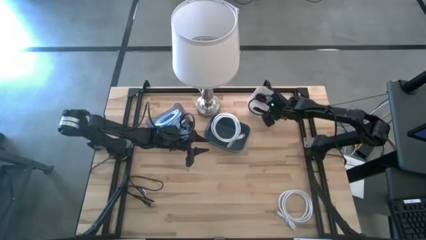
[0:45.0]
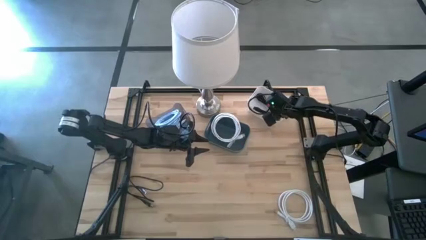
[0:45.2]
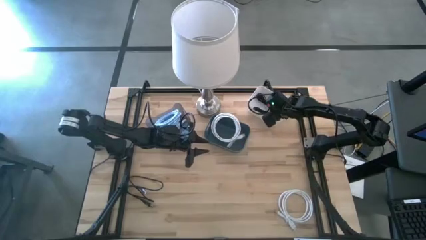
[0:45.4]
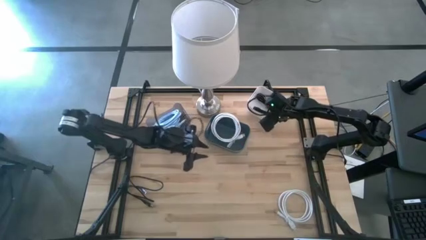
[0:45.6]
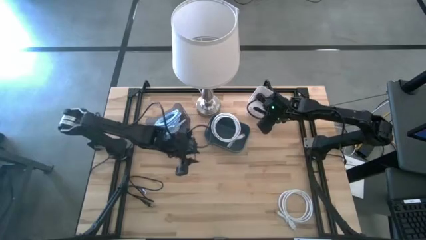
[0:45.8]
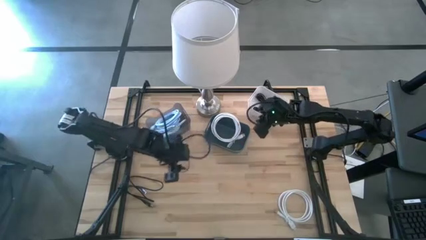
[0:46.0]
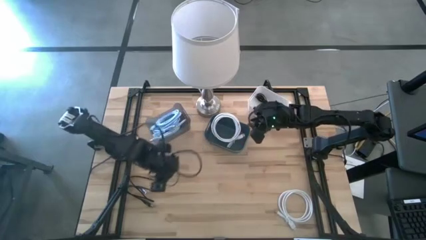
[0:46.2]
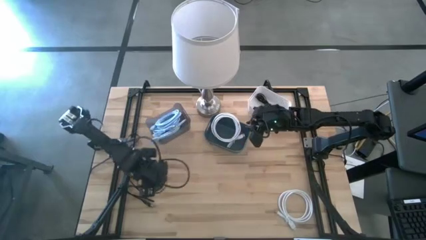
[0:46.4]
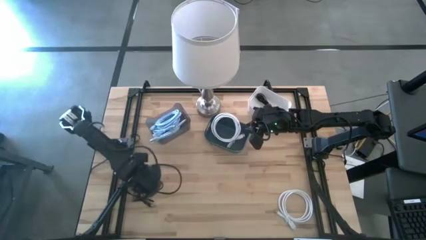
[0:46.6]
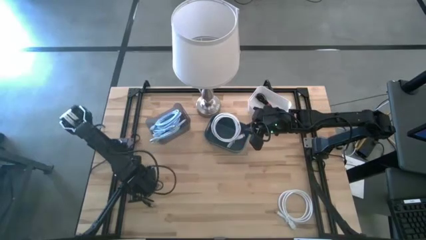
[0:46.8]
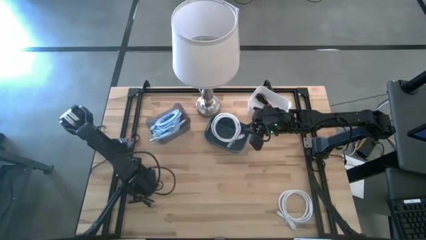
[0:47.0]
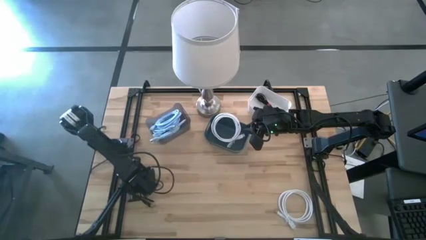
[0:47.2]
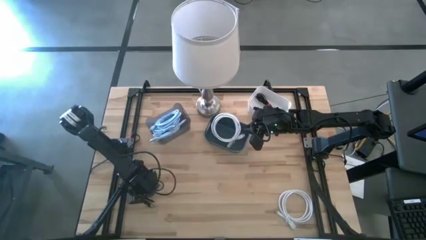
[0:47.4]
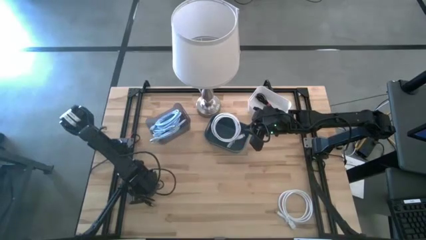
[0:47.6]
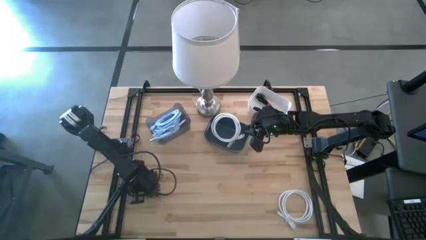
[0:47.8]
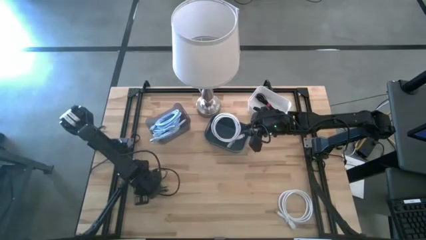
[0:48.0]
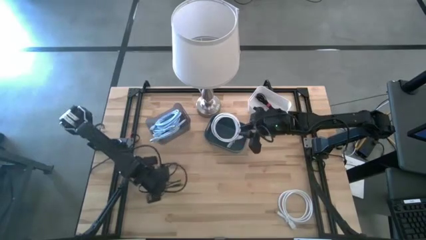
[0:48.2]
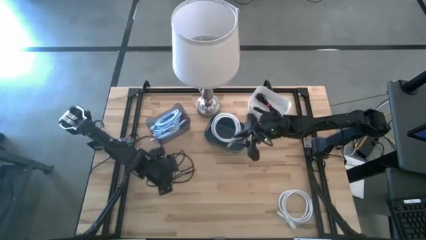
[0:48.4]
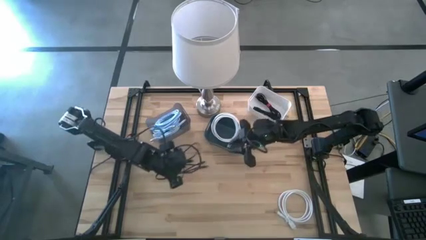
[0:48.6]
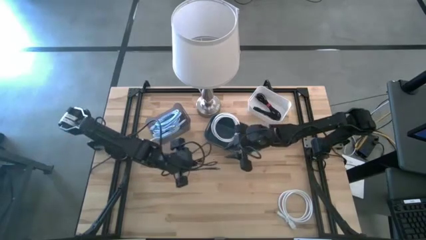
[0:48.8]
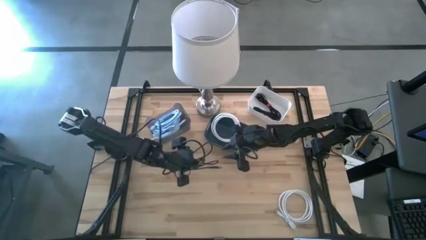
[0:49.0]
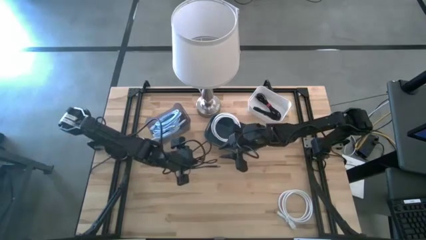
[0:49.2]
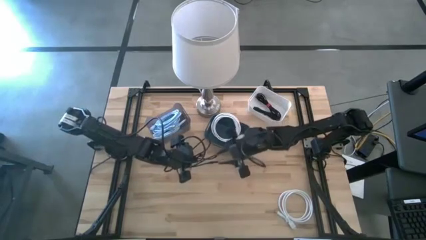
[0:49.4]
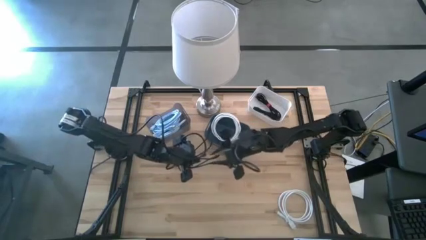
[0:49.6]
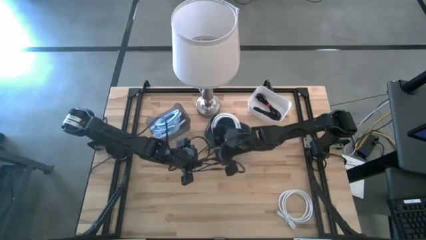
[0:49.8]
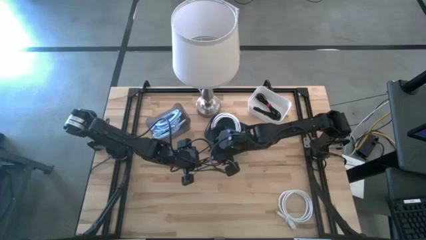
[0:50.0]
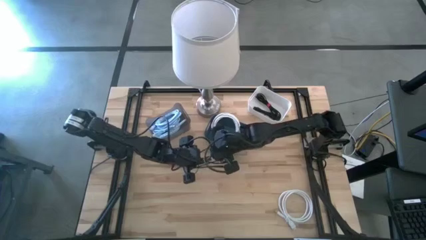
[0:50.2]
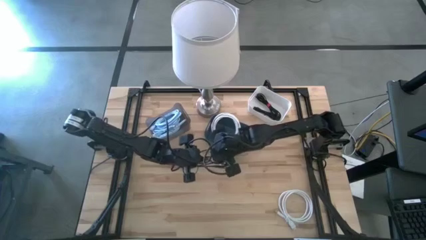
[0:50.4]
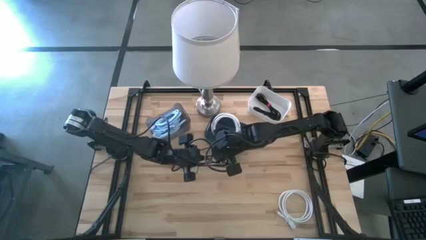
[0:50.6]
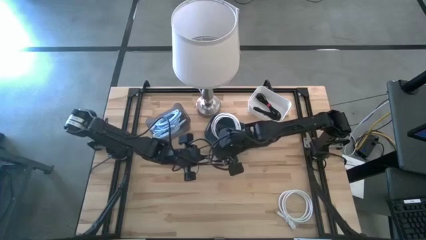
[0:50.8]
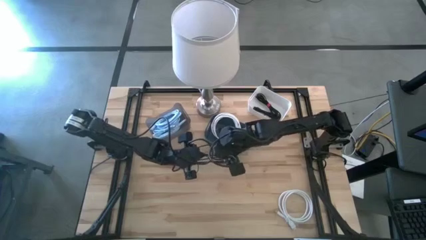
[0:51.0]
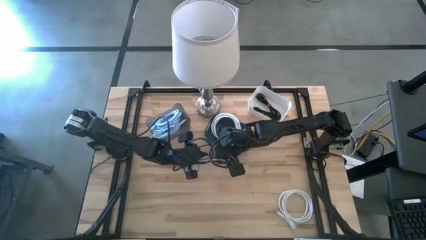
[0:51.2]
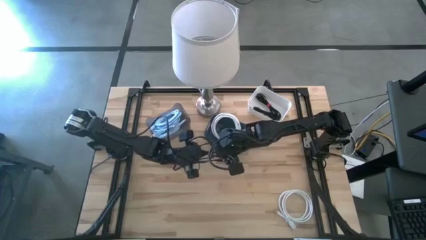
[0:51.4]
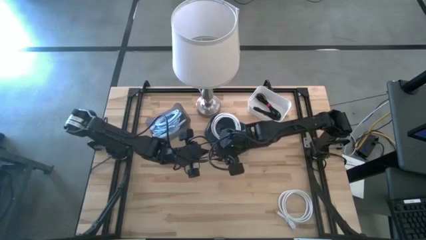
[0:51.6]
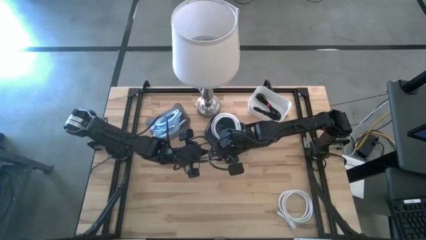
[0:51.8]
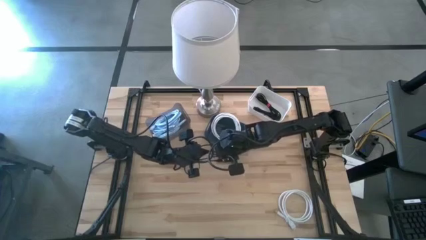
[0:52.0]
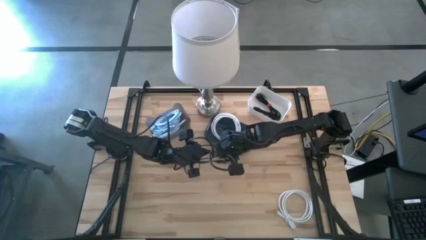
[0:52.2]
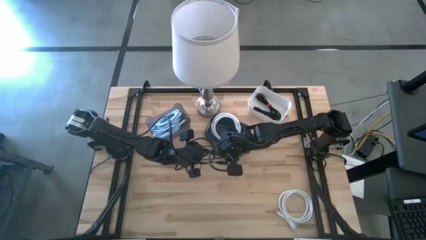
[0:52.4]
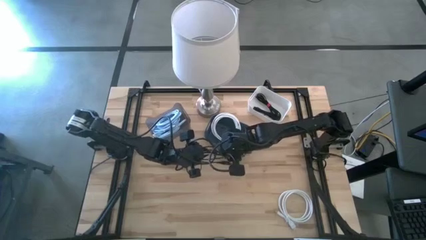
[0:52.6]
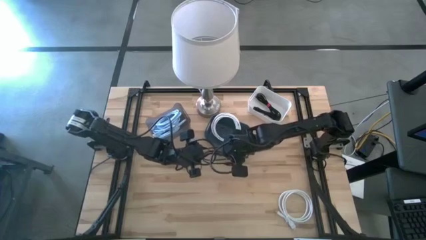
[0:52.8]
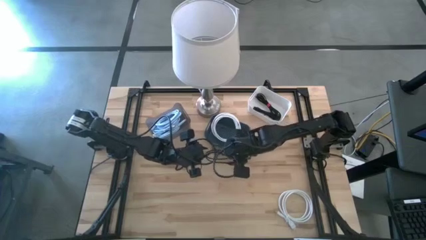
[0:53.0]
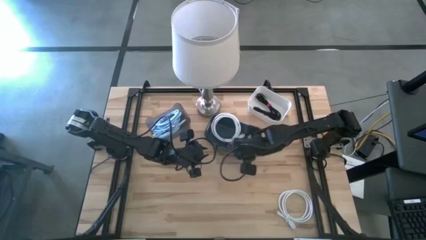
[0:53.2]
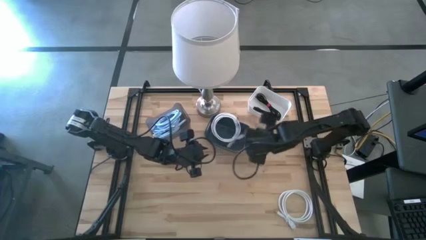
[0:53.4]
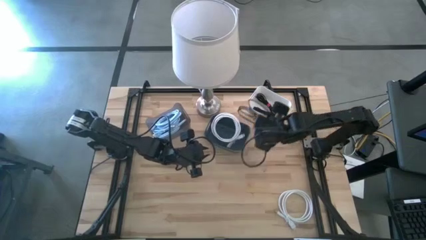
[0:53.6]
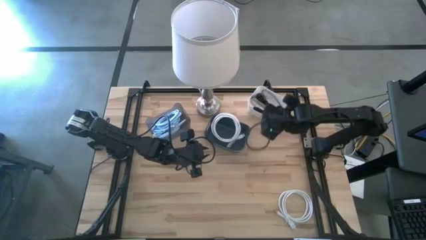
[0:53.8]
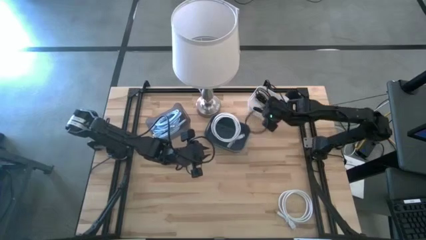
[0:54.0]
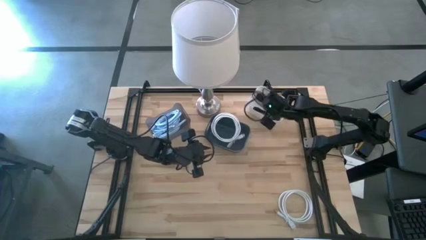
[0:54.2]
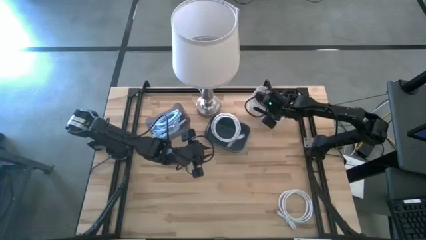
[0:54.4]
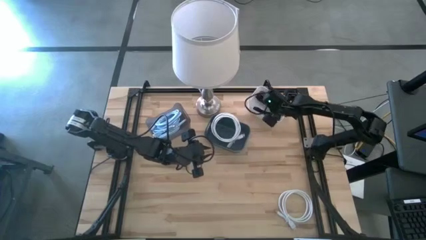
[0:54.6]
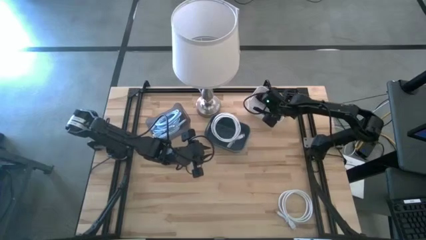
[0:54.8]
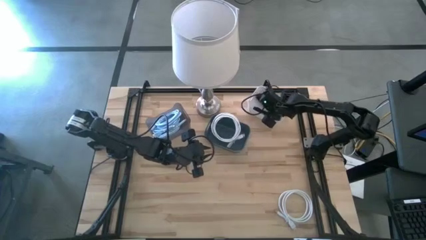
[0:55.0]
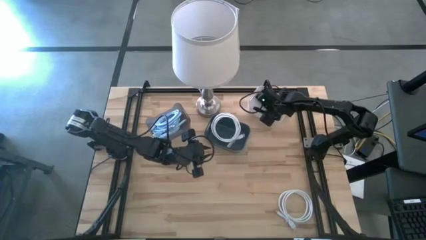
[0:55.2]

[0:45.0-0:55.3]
Task: Pick & Place USB Port
Put the black charger cable into the white bin

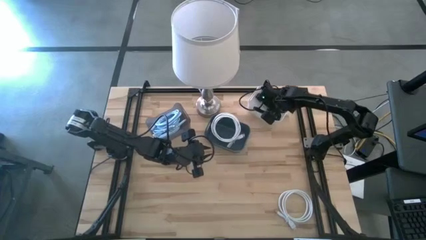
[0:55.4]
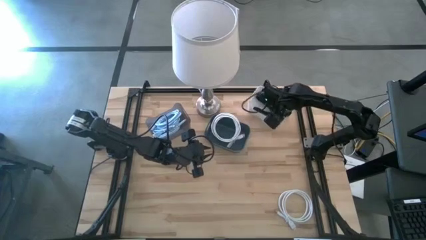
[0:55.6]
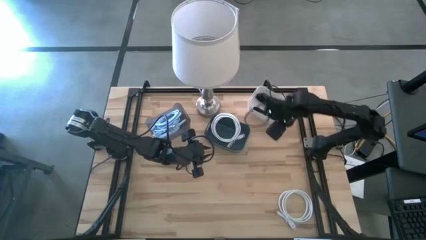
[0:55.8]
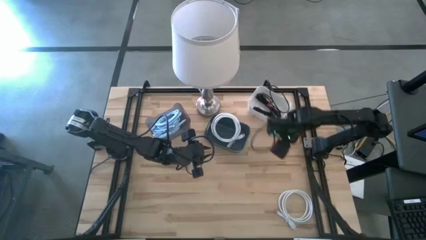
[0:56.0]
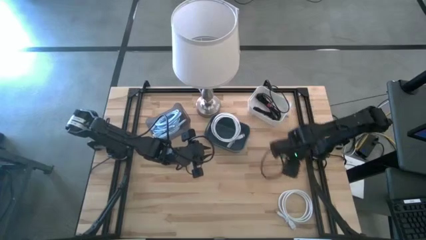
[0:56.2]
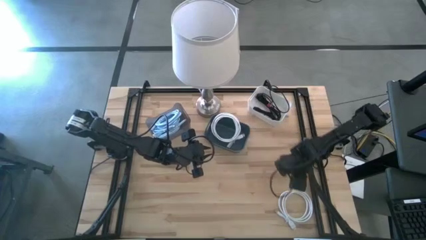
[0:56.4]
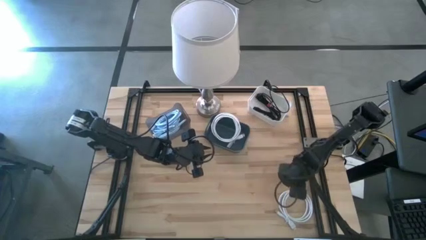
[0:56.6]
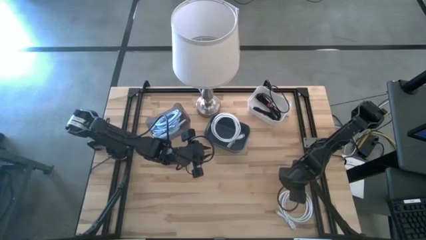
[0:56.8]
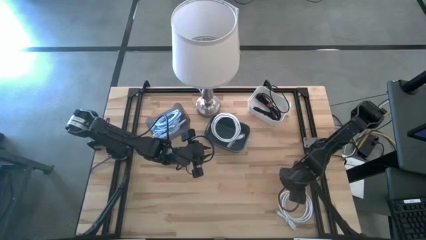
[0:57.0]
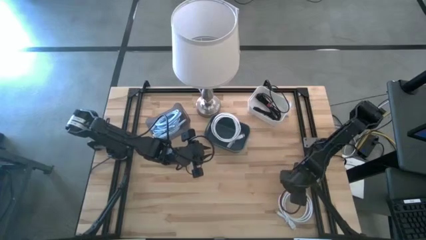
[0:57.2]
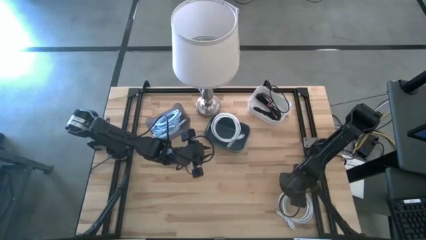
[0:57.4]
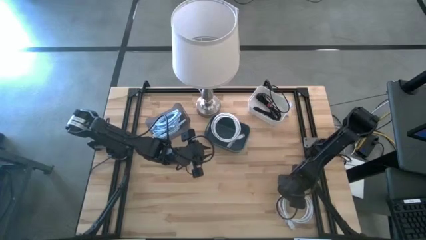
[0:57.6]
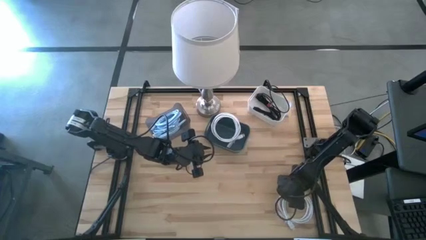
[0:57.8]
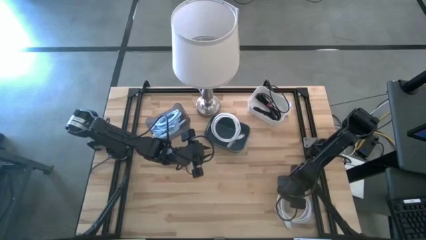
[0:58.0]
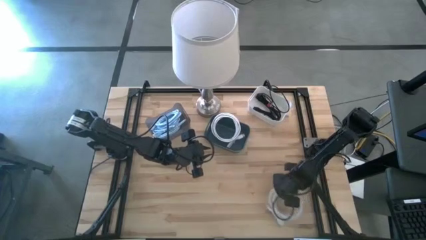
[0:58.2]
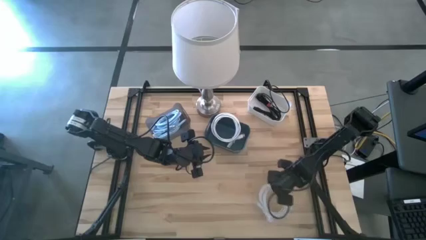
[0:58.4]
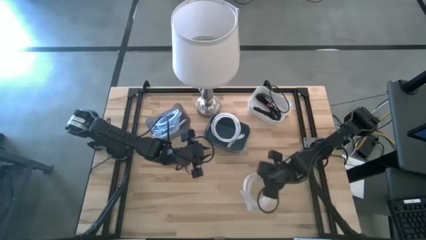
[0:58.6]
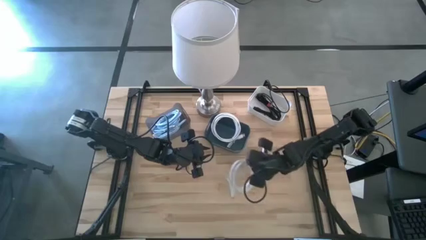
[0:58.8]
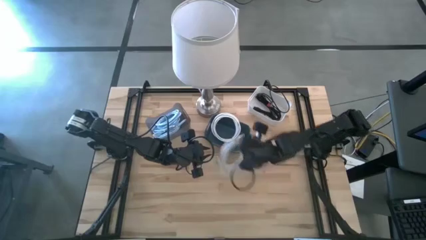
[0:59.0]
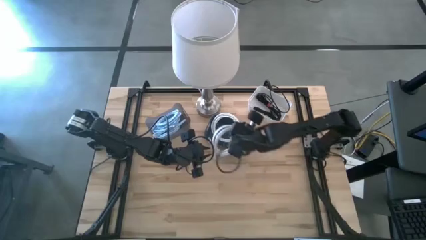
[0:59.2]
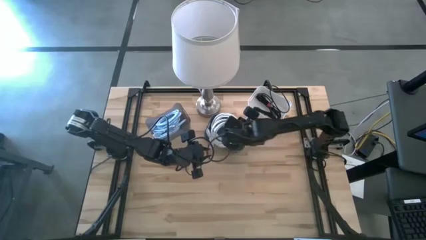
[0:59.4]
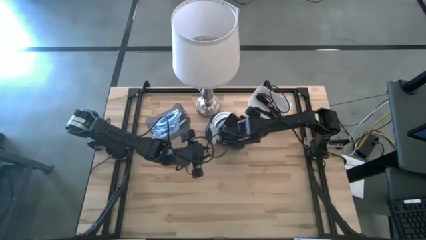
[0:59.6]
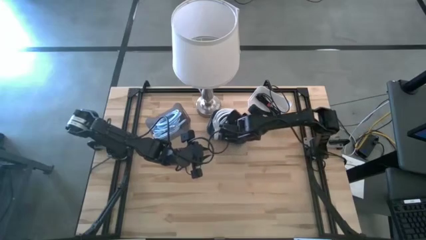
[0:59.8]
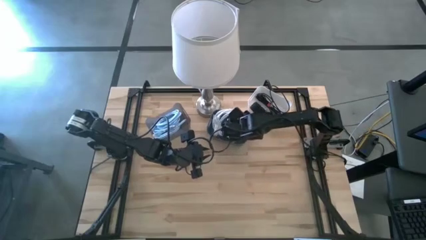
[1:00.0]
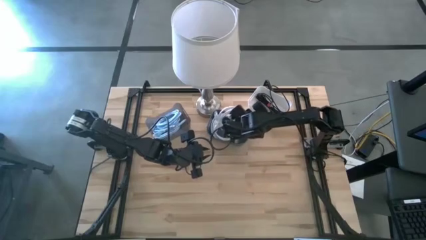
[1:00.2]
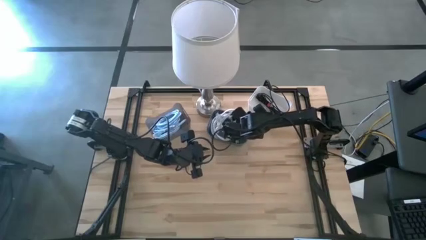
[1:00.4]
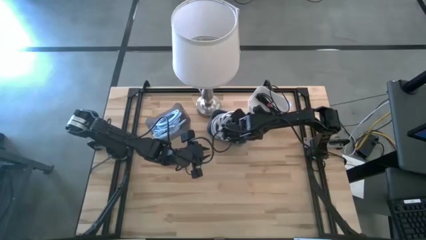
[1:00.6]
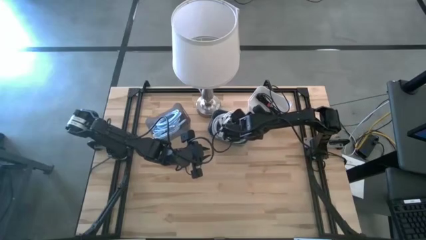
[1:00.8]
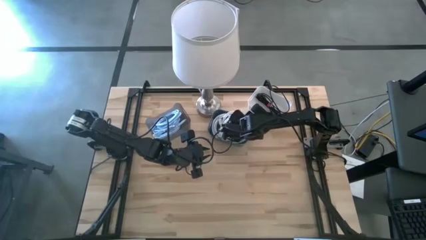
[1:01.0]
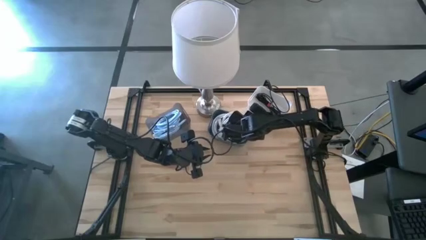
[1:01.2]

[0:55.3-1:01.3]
Put the white hdmi cable into the blue bin
